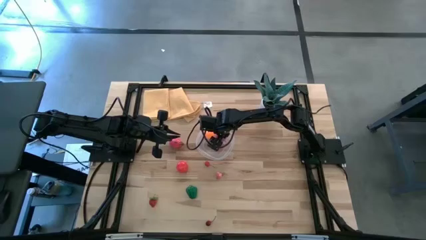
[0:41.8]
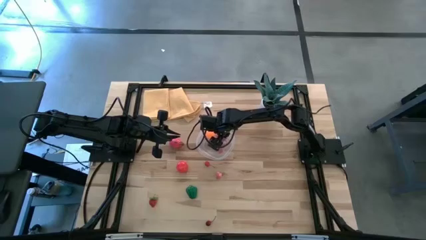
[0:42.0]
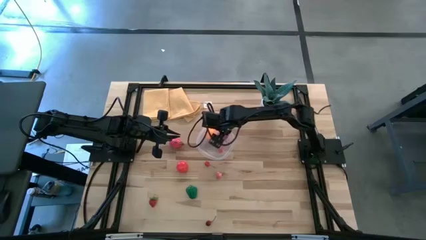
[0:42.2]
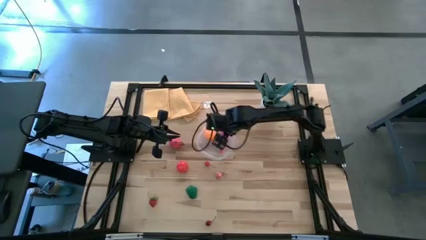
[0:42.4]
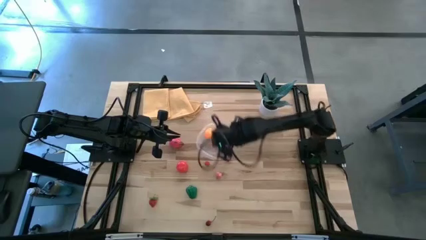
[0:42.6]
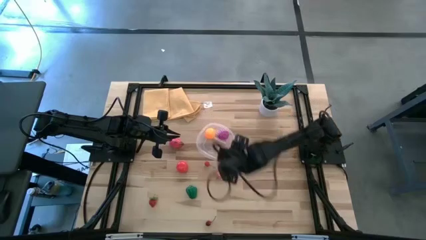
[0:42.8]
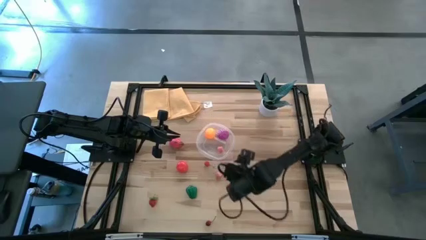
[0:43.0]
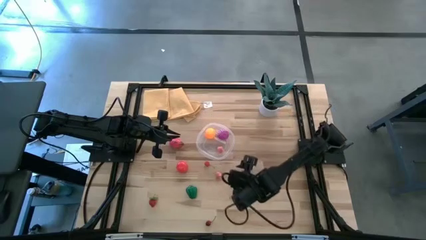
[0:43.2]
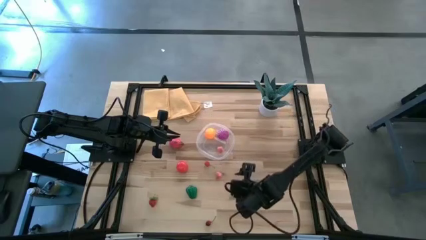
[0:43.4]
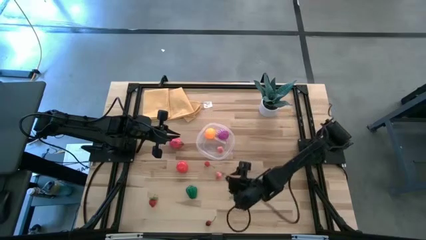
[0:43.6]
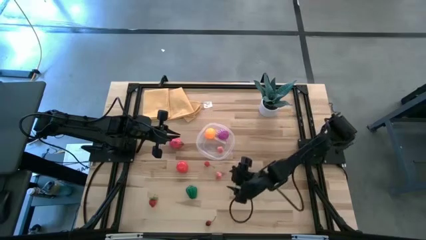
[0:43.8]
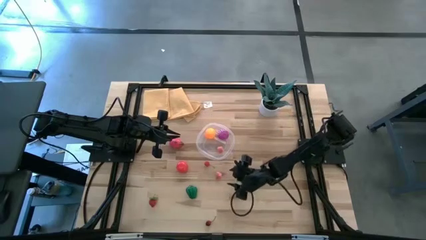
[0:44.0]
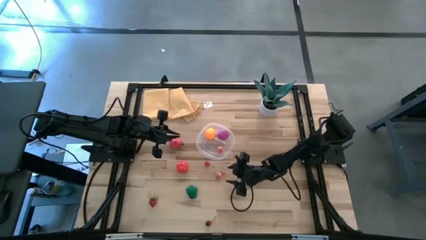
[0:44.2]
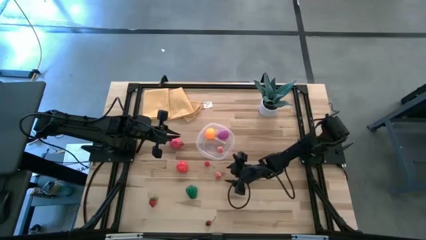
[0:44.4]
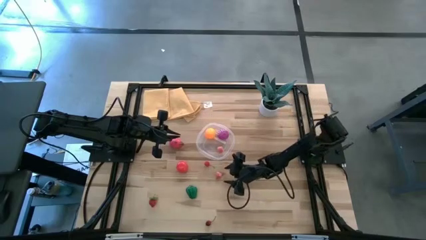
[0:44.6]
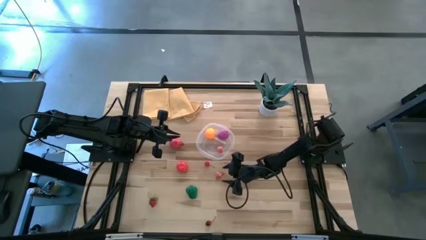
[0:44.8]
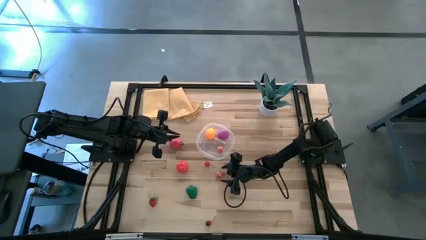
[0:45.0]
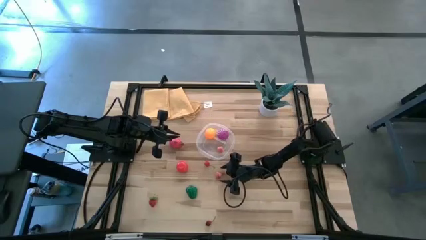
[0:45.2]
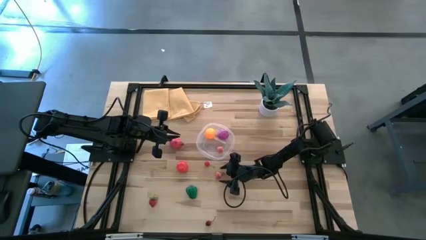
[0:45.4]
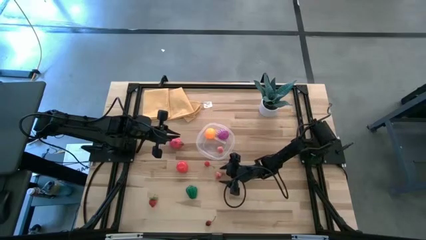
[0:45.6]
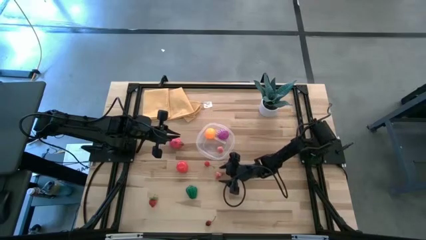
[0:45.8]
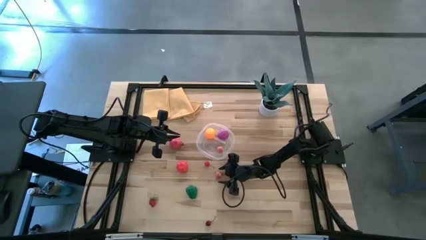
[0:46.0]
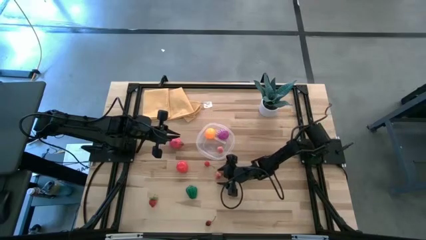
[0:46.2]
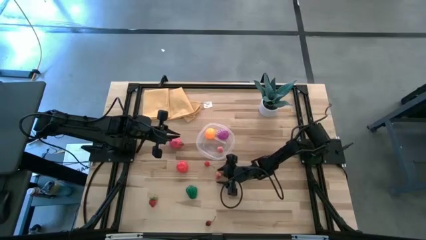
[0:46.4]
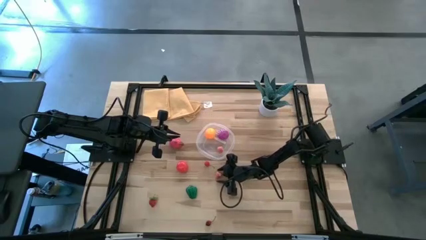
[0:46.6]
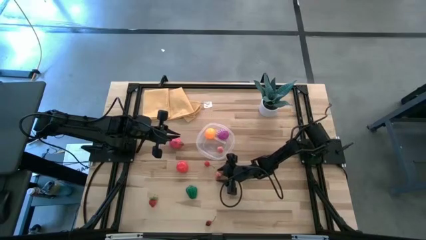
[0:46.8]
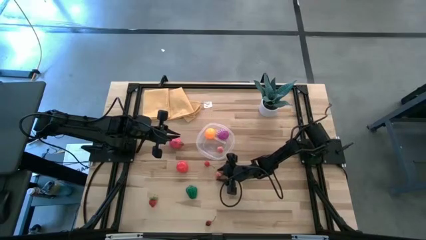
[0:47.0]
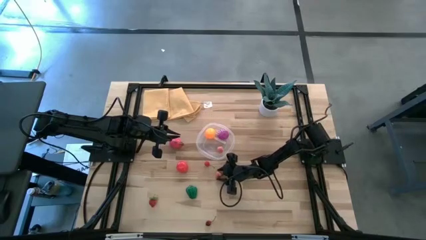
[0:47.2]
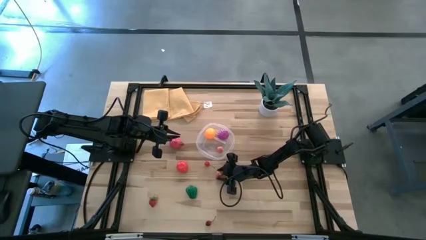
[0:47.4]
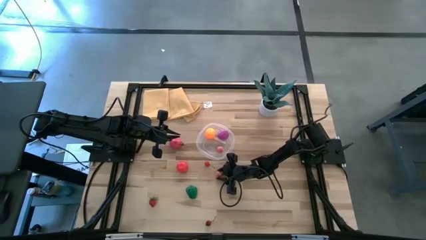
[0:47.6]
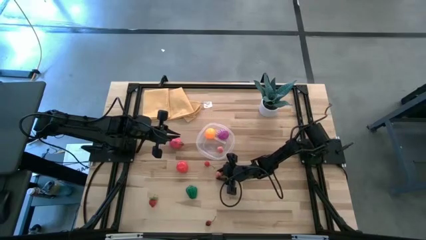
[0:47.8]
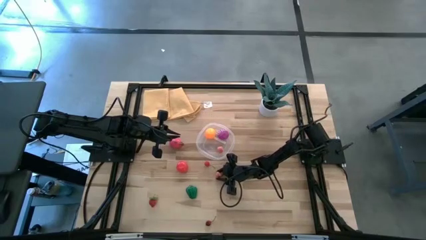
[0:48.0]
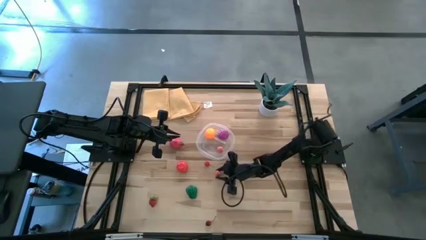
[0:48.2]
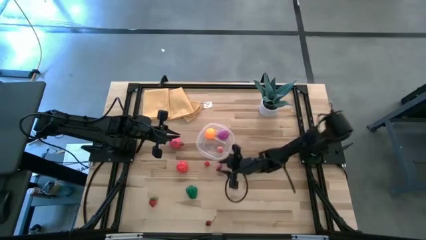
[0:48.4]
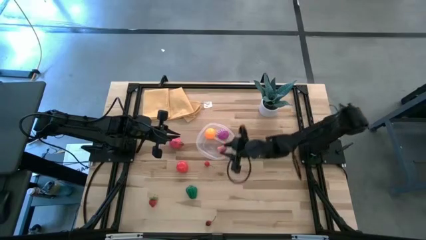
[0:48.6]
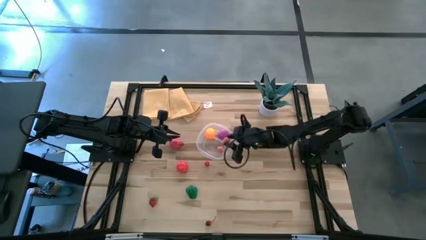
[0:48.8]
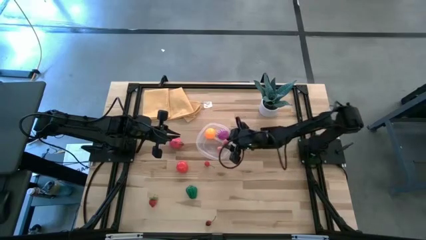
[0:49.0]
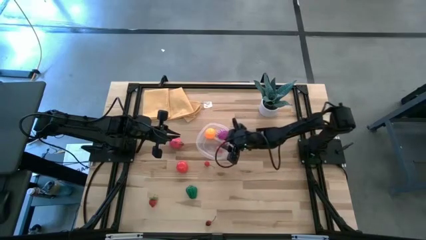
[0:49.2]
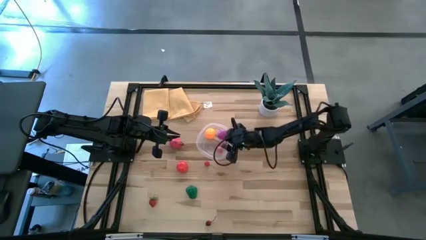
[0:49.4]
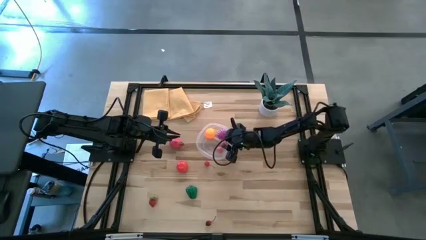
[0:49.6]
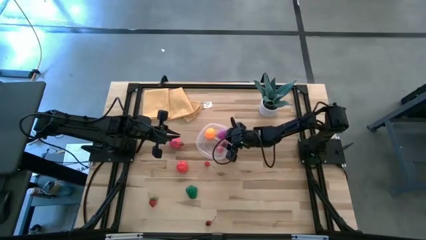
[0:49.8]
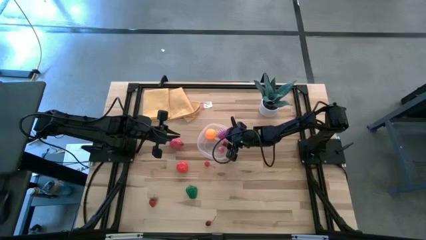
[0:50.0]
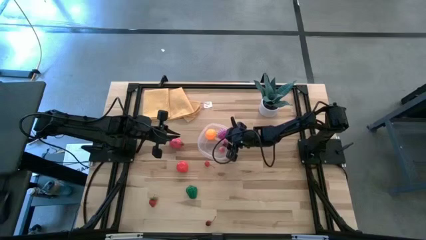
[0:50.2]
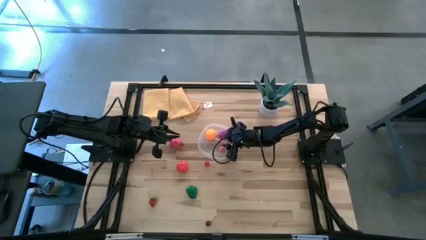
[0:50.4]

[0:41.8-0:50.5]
Task: Pick and placing Produce into tupperware
Put the peach into the transparent bin

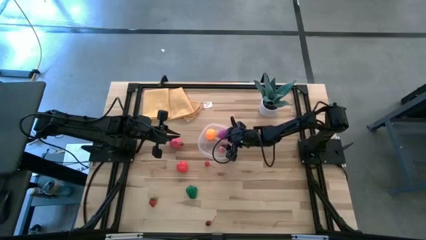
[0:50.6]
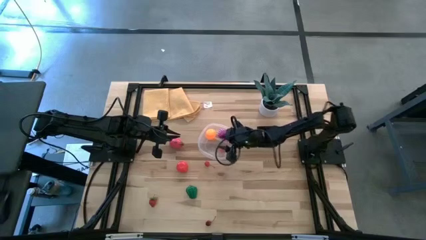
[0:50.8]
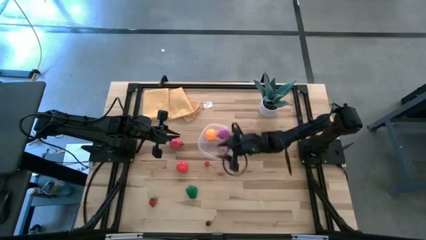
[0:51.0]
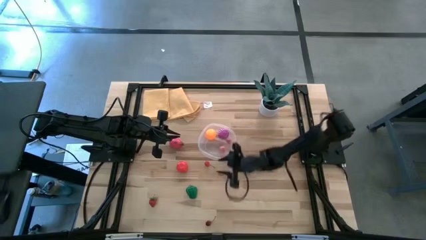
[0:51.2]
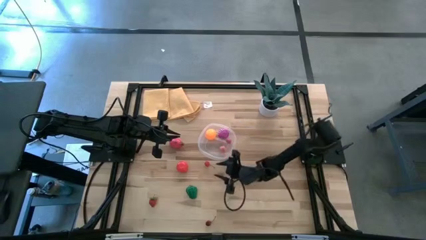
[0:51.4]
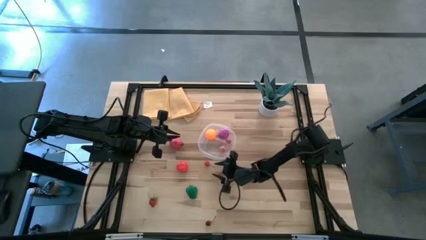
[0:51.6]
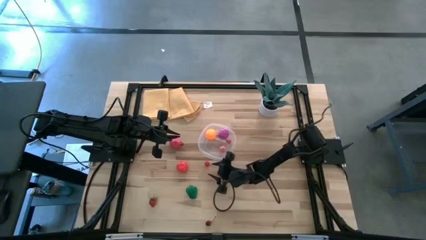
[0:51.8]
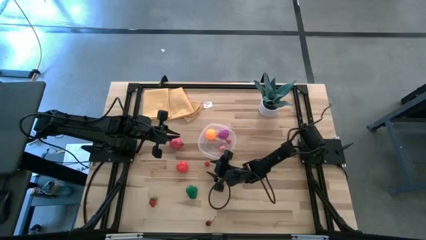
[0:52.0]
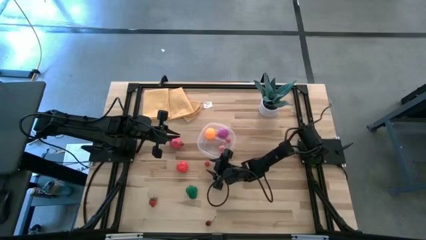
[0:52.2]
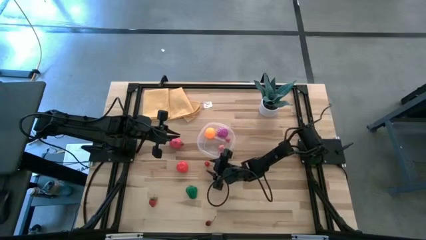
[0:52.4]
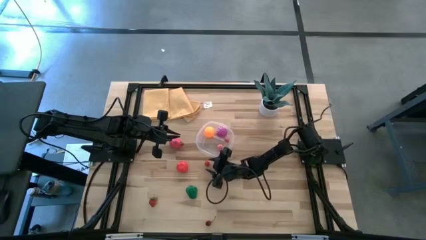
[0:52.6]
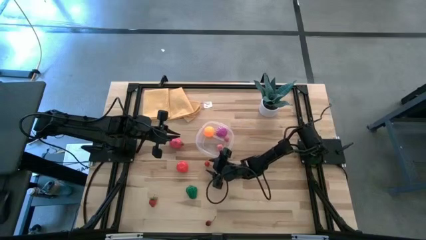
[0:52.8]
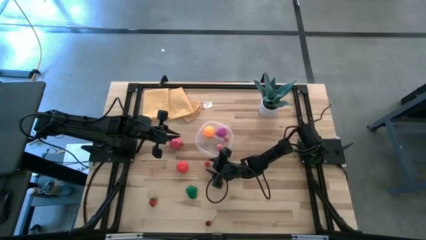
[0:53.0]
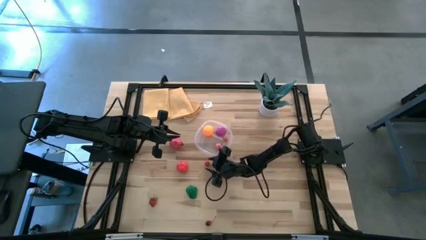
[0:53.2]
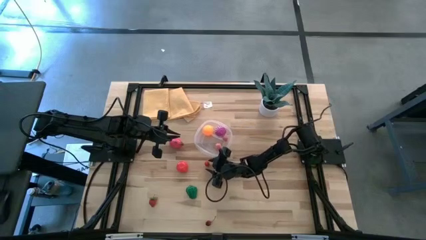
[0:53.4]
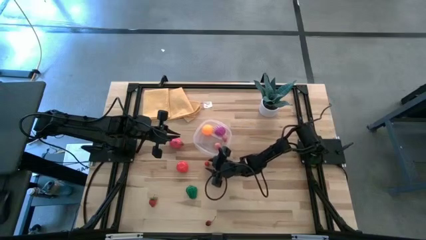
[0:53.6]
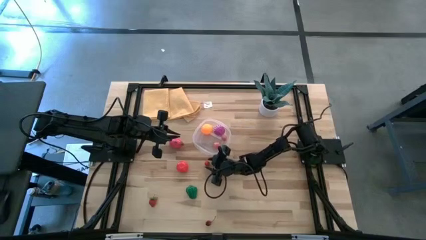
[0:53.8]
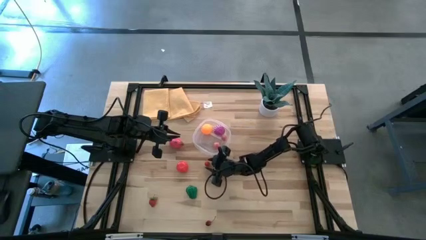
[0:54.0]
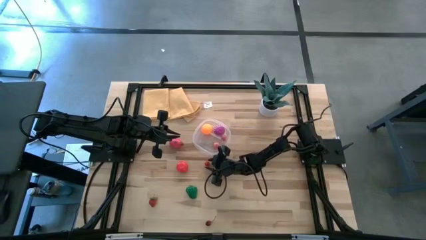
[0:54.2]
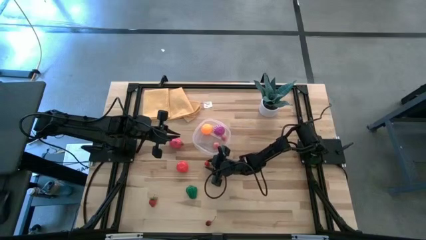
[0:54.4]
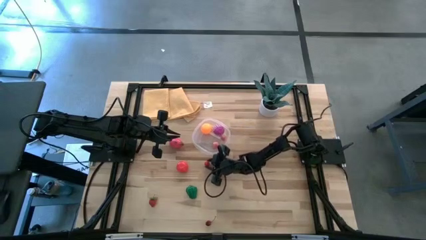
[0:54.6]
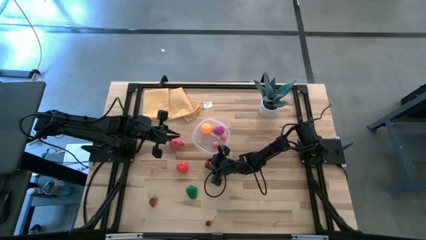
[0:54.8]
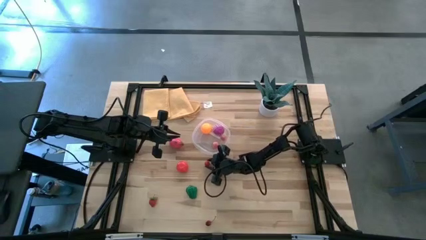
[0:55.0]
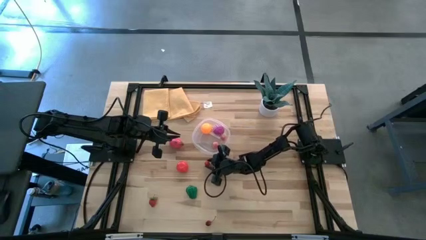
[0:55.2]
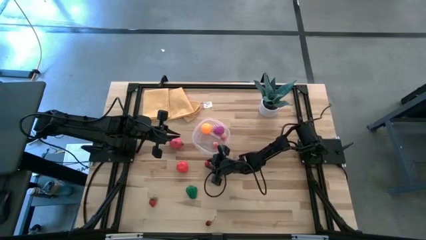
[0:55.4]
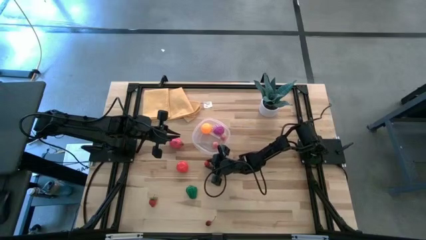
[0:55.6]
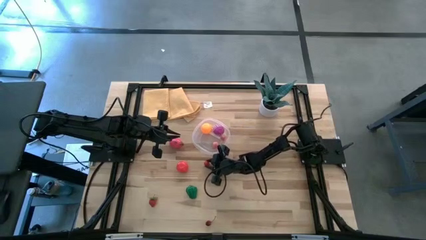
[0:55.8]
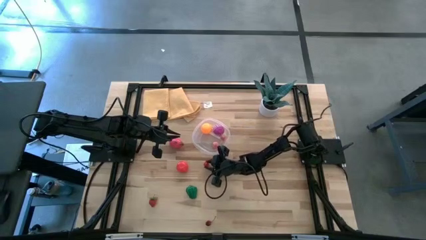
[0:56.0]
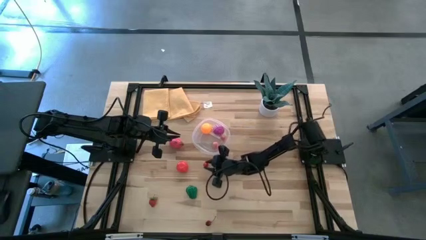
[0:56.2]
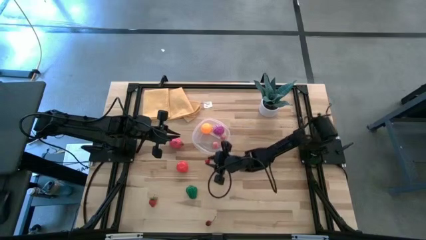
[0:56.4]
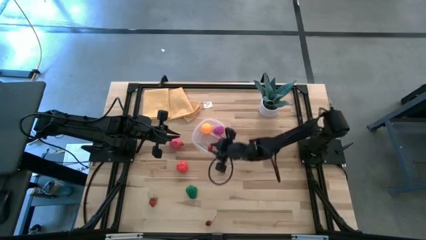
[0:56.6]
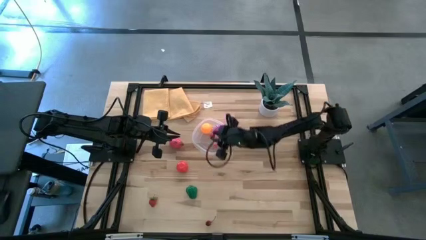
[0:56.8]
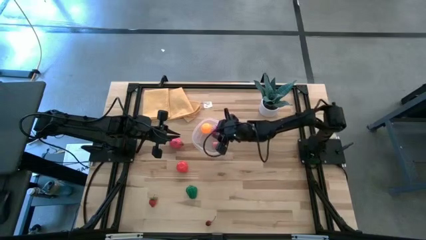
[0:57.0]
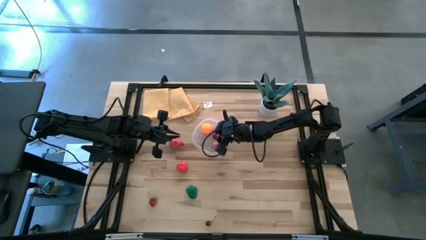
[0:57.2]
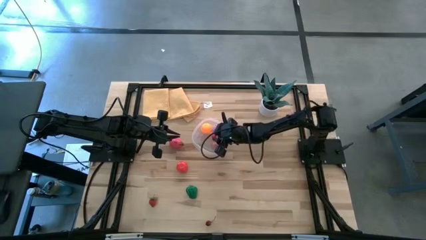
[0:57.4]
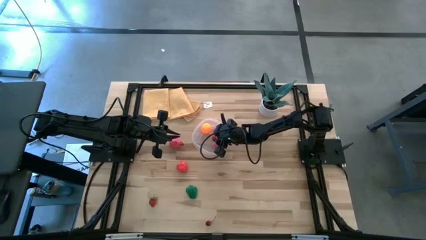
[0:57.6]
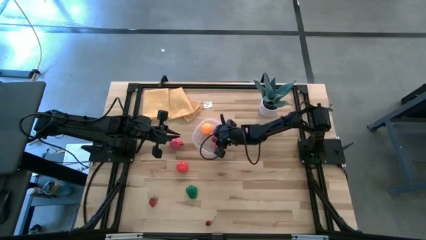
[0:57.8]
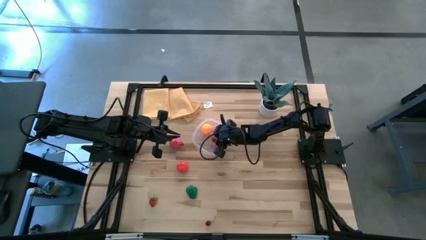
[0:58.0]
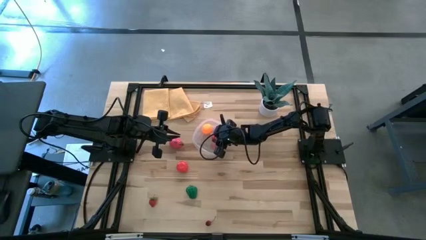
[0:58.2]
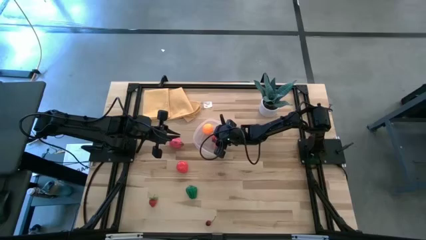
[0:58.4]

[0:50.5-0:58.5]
Put the top cherry into the transparent bin

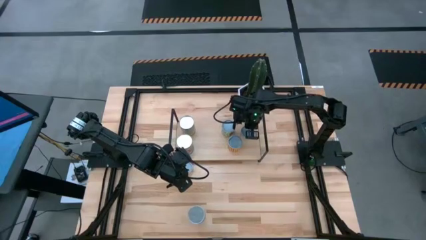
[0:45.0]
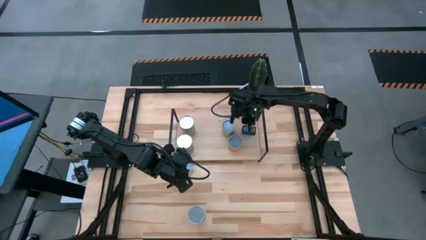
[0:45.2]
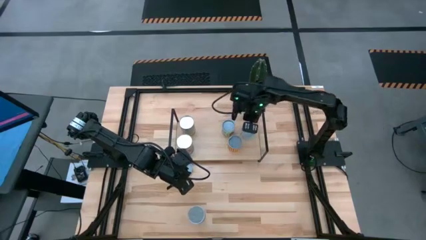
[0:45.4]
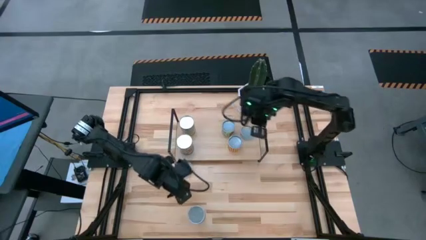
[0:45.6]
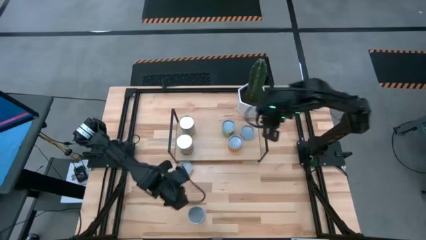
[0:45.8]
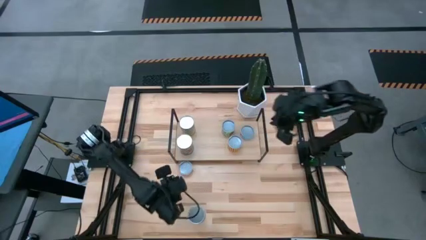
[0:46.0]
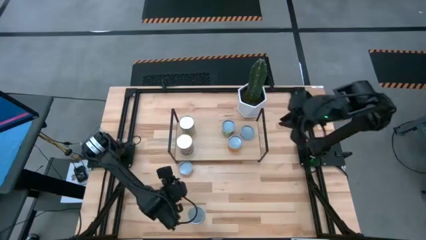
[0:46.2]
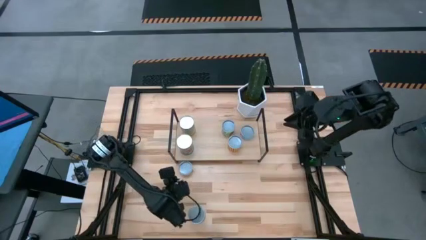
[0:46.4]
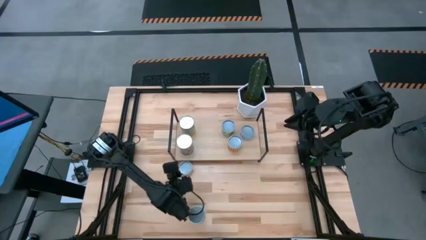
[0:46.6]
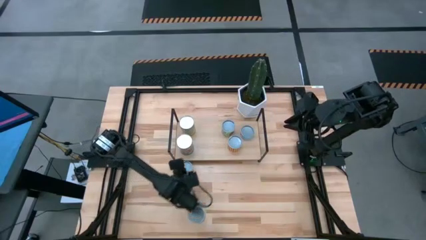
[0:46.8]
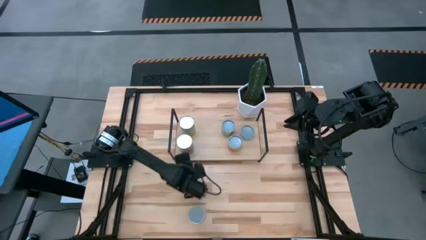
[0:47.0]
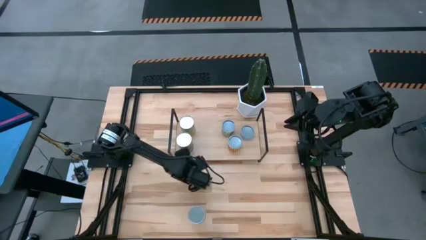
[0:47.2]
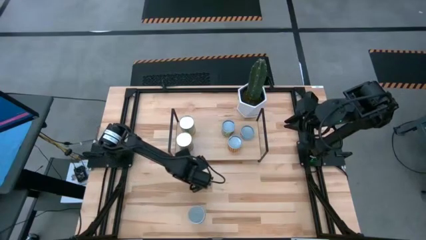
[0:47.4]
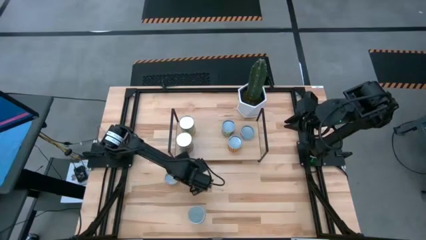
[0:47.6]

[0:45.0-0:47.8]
Task: Pick and place cans onto a shelf
Put the small mushroom can on the shelf aligned with the other small canned salmon
